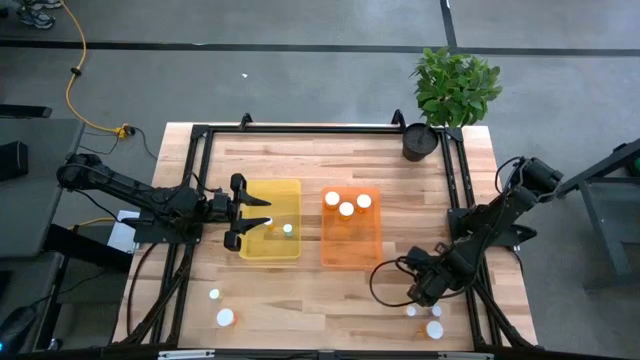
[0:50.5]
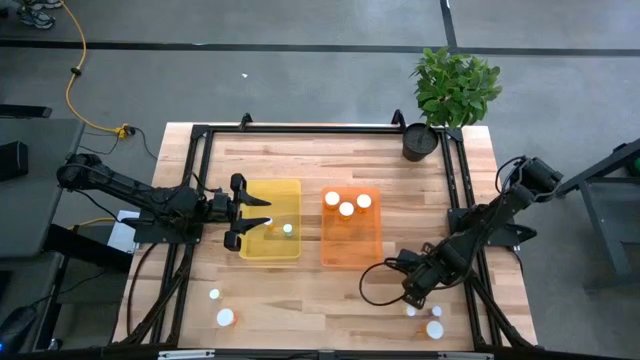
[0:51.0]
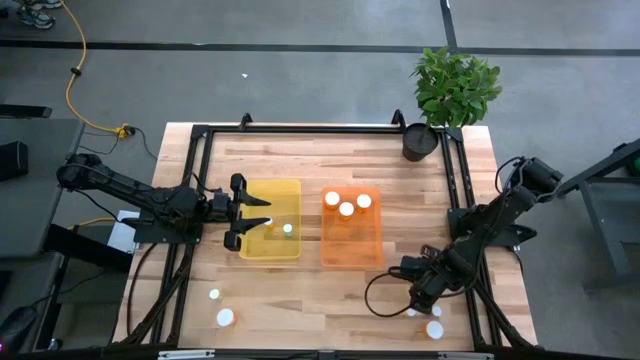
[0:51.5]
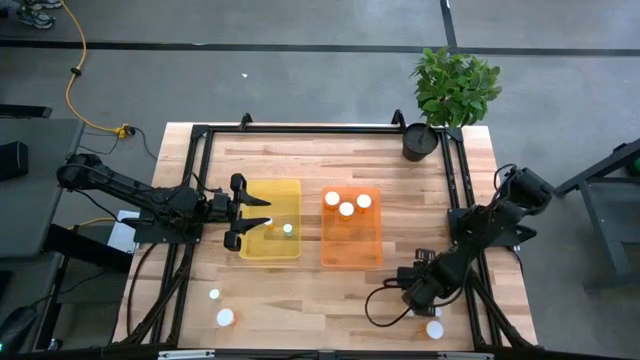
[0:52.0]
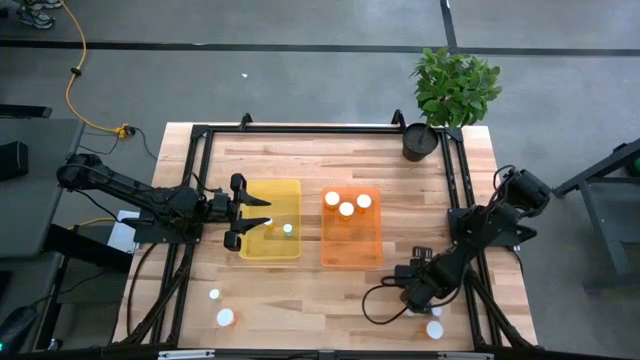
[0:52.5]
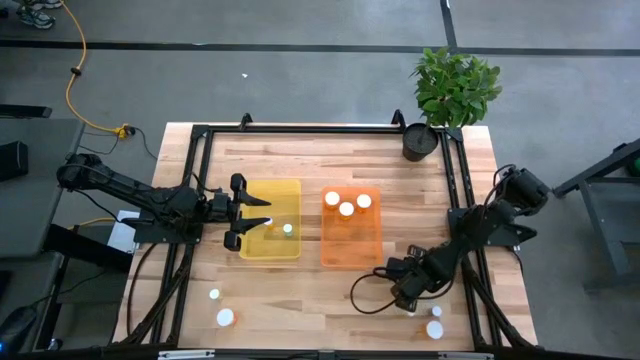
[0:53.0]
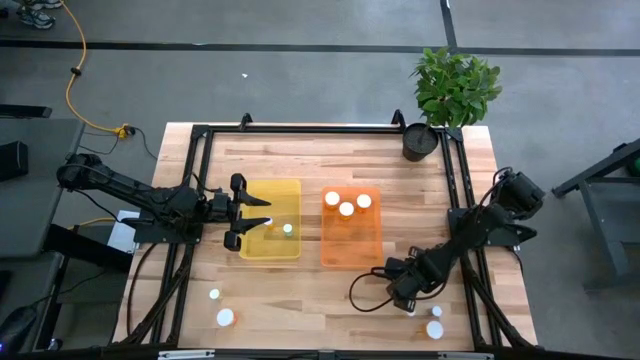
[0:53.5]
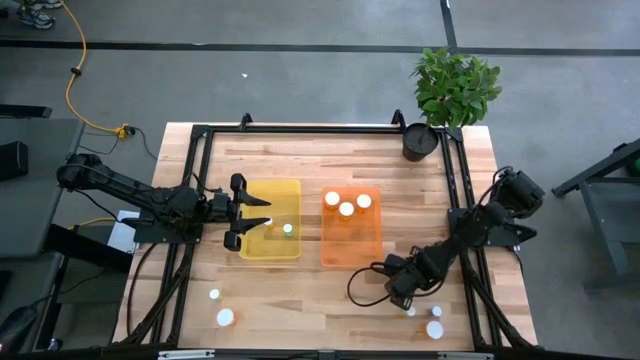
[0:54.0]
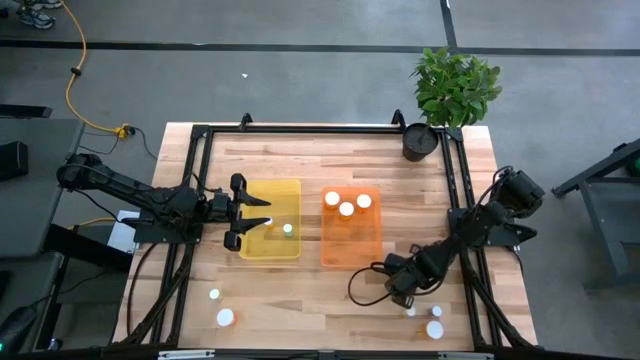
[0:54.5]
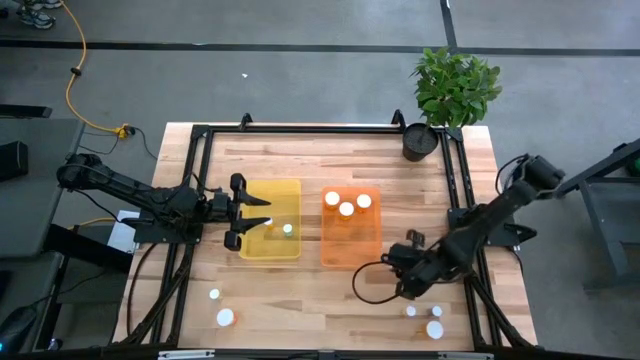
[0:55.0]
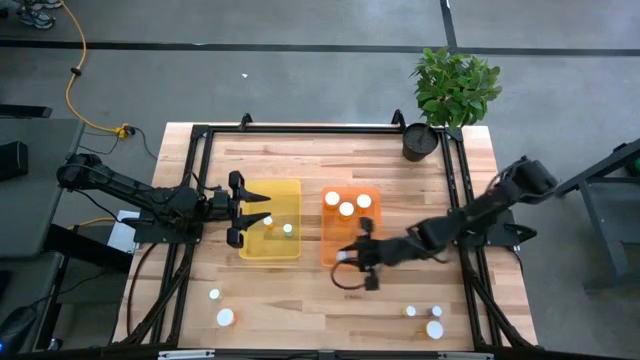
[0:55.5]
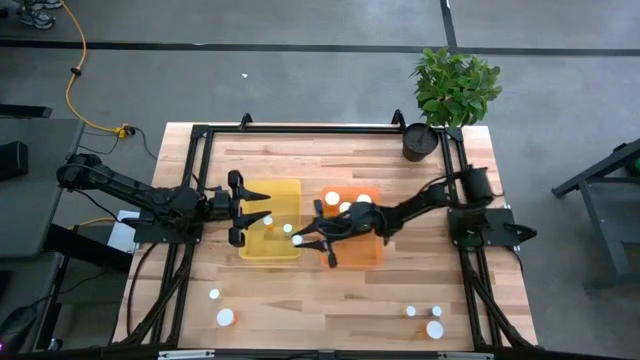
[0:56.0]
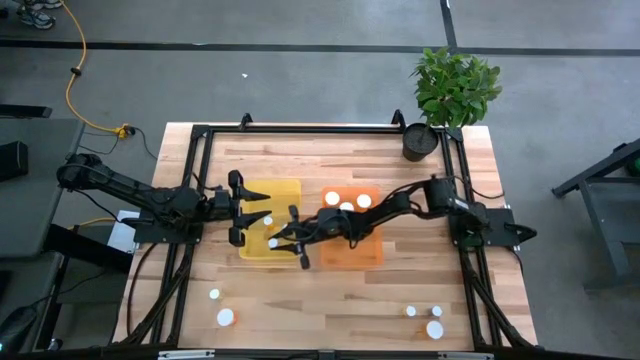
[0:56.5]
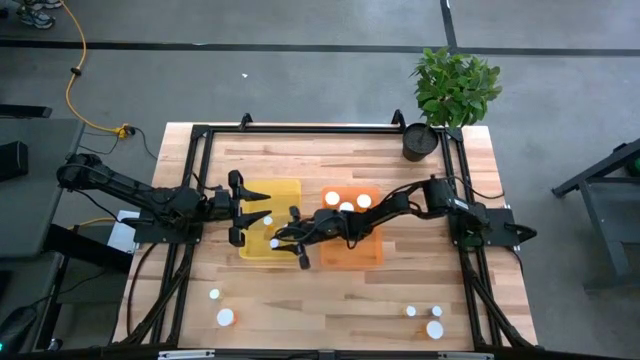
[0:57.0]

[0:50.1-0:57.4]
Task: Pick and place medicine bottles into bin by pill shape (circle, oval)
Put the pink tablet bottle into the yellow bin

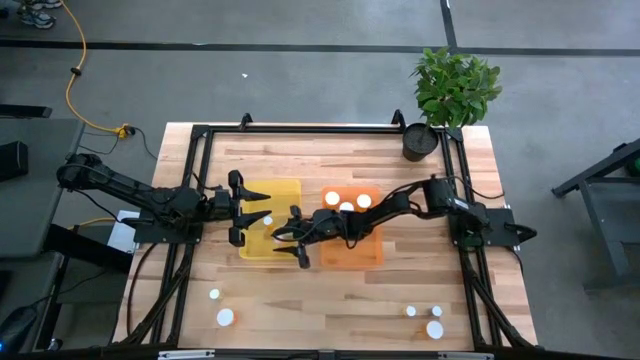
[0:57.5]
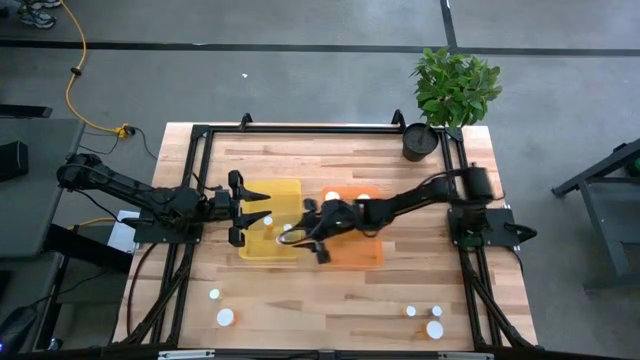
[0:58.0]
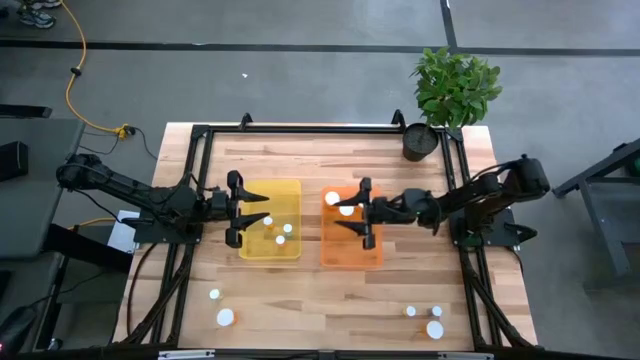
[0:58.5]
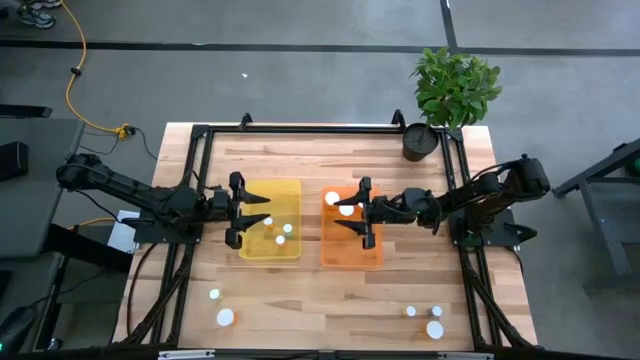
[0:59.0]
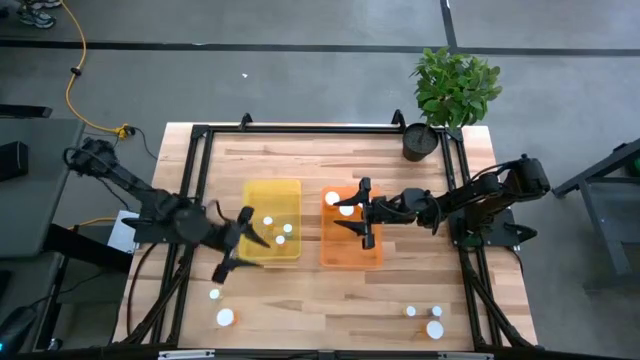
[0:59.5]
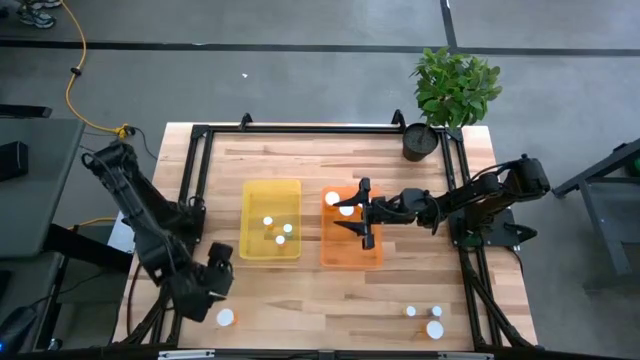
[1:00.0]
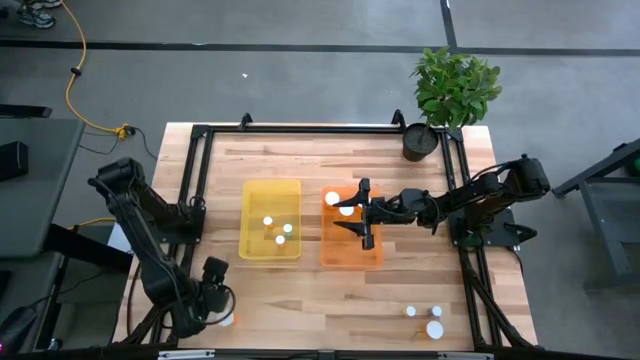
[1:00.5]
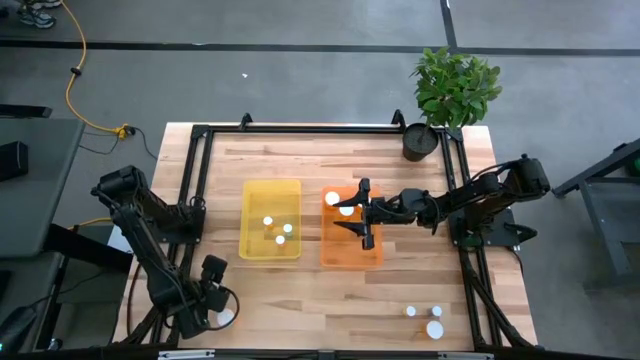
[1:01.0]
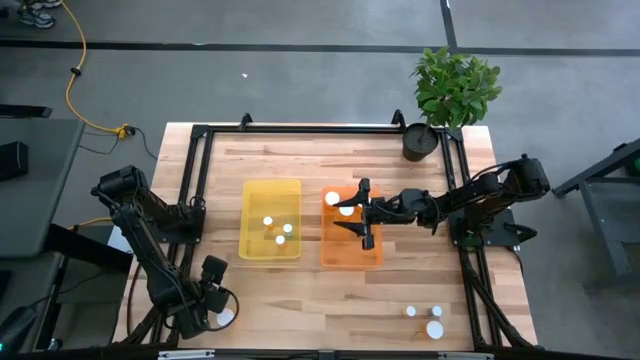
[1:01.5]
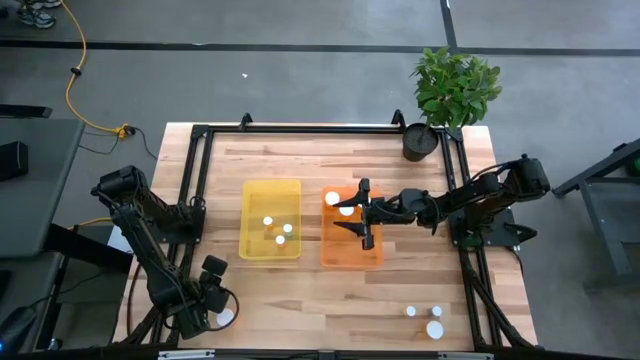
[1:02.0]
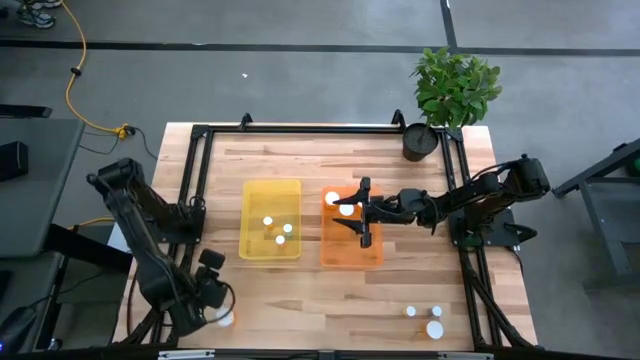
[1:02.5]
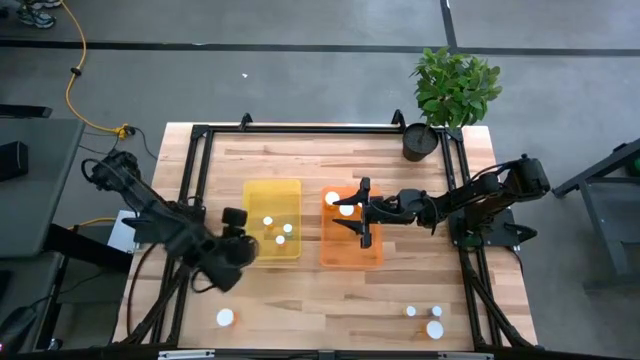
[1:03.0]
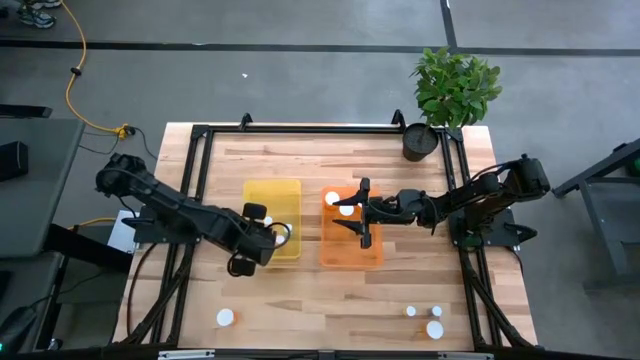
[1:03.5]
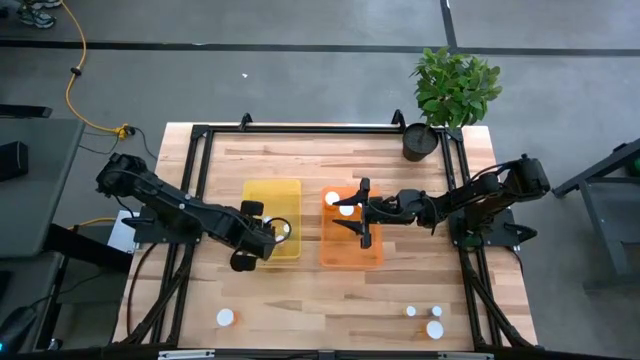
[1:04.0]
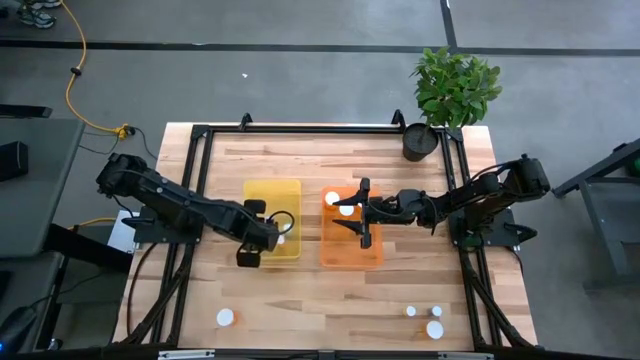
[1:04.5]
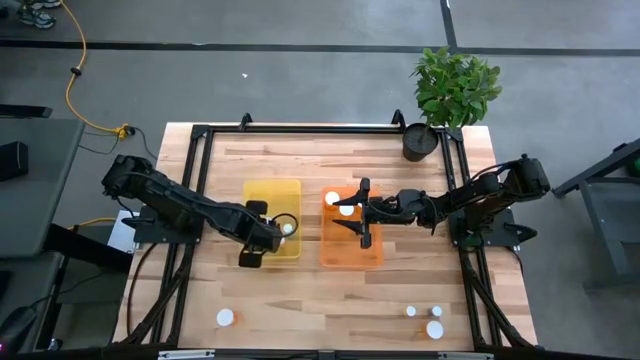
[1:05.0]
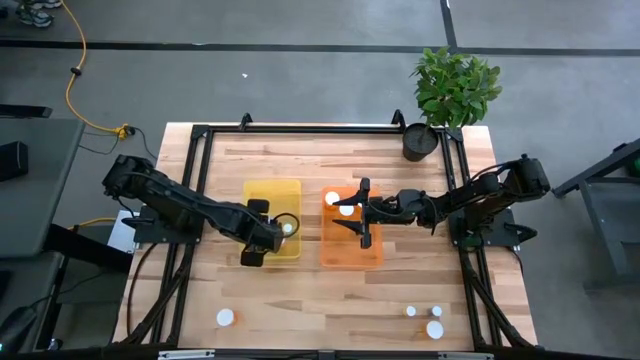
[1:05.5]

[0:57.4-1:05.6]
Put the yellow tablet bottle into the yellow bin

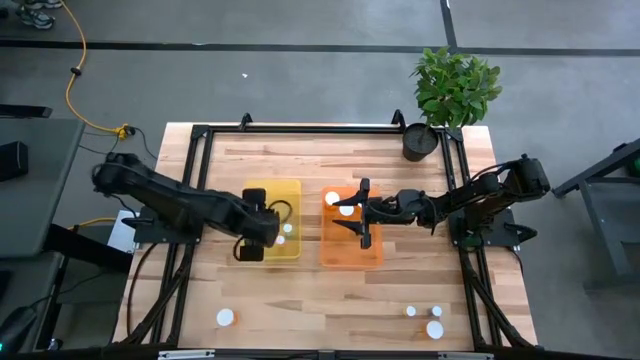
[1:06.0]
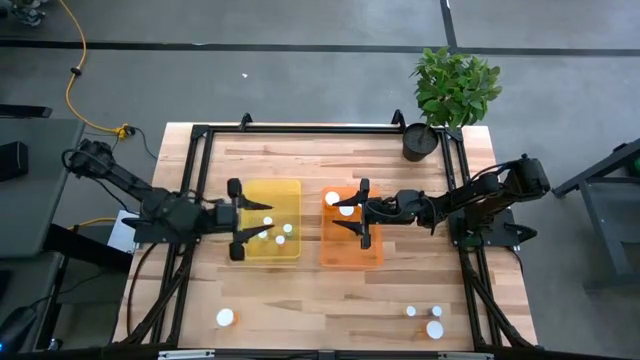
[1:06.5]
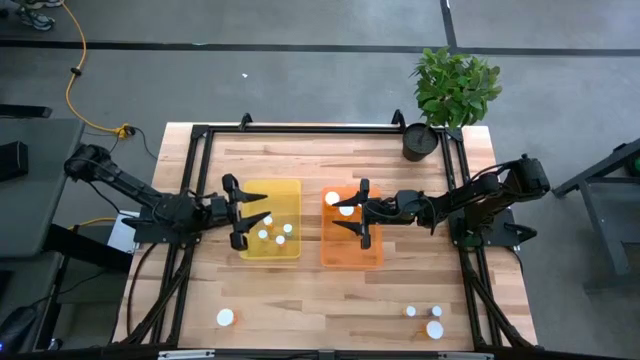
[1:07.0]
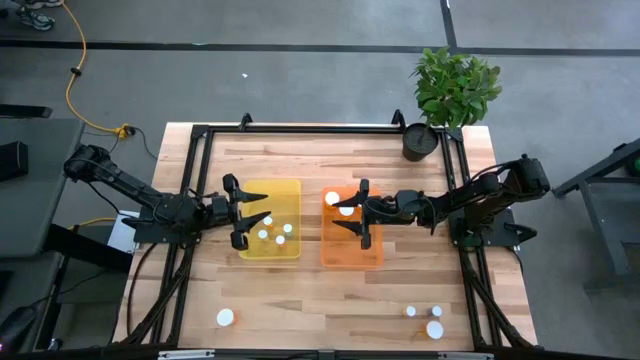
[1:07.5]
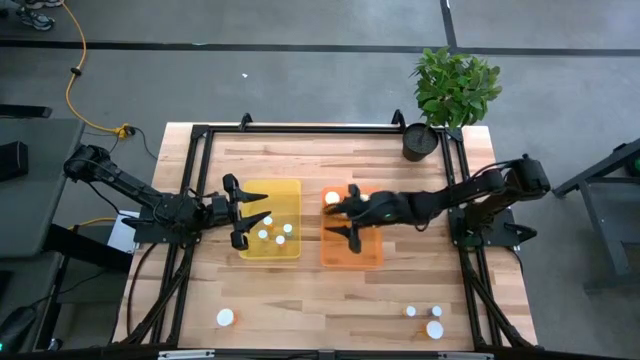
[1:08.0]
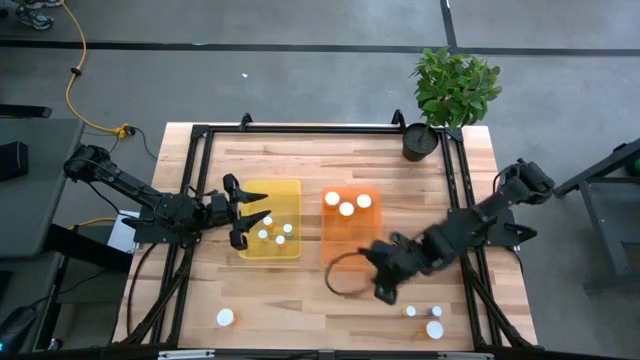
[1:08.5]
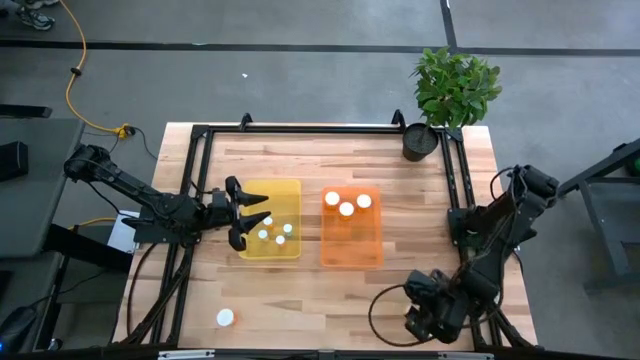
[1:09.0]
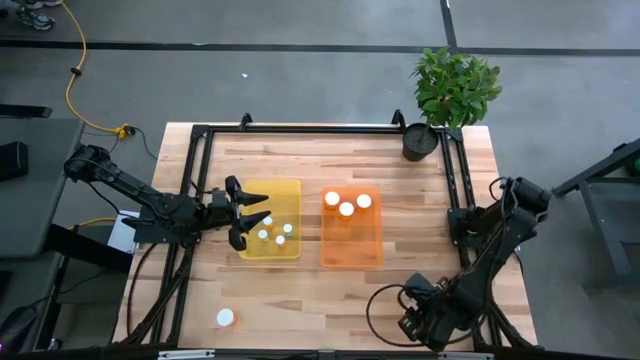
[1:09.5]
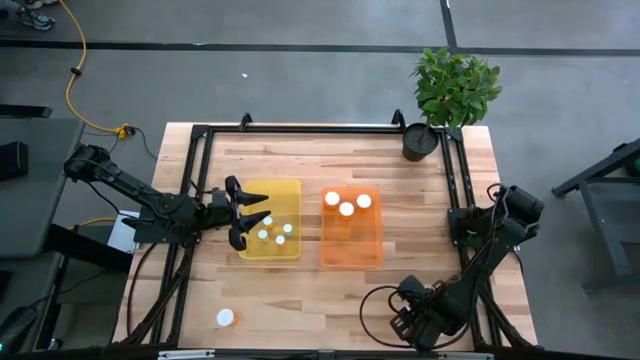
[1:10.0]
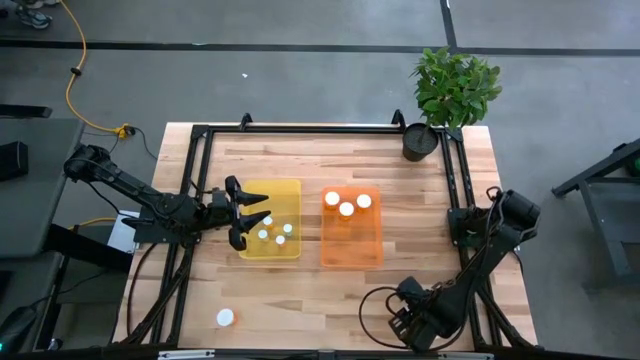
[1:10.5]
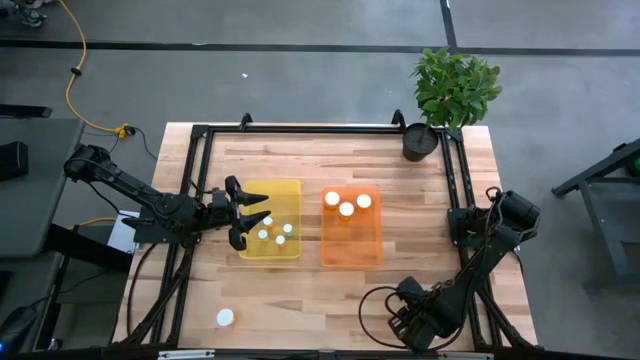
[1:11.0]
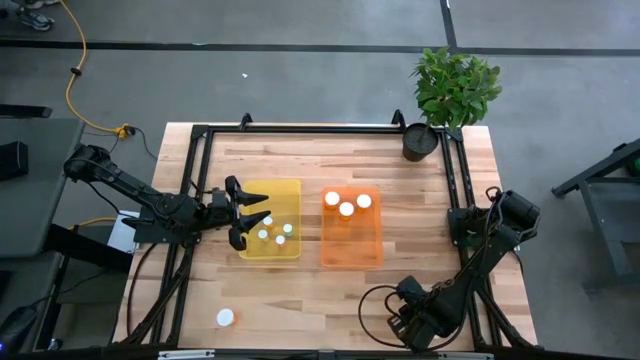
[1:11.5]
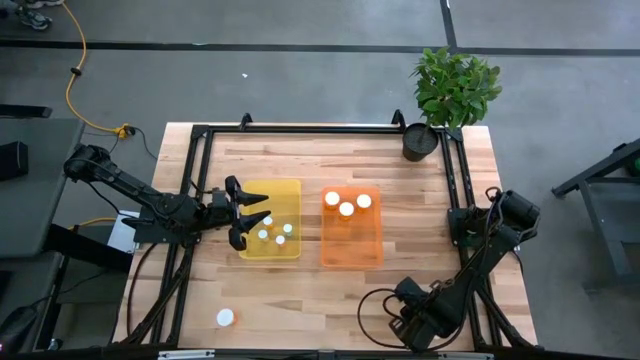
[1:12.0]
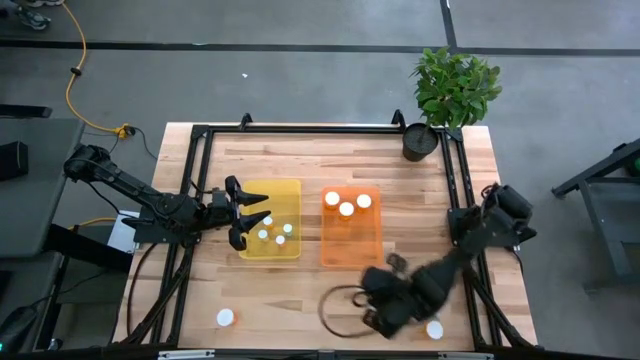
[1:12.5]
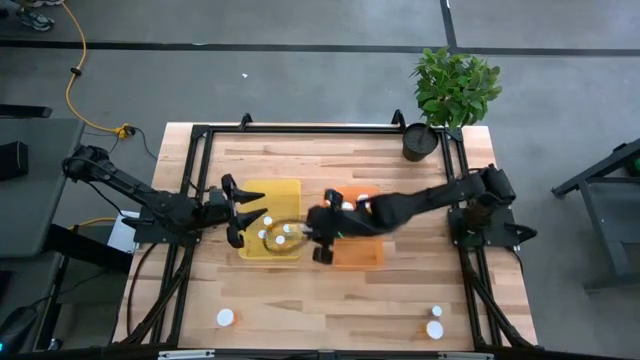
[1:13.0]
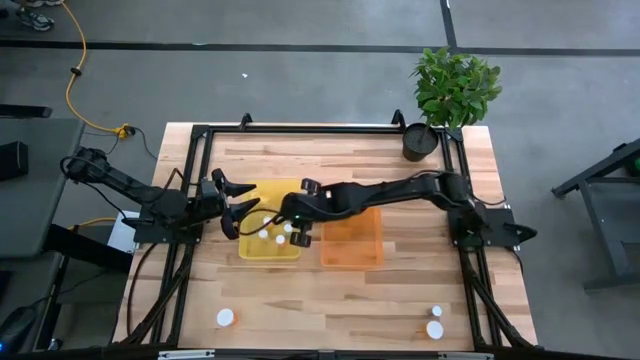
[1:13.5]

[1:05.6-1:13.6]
Put the yellow tablet bottle into the yellow bin
